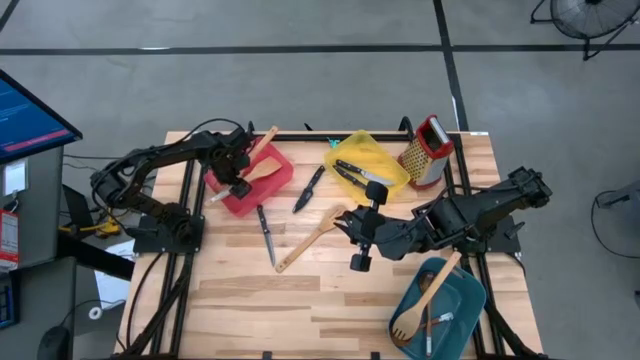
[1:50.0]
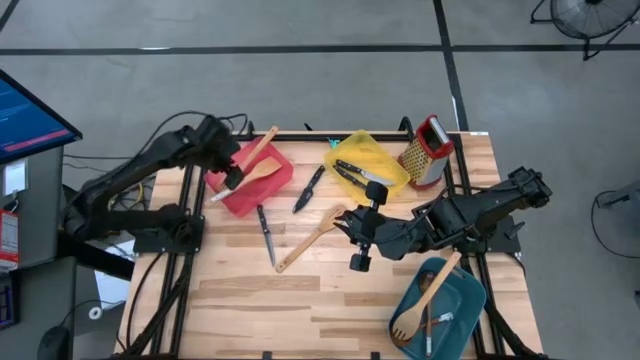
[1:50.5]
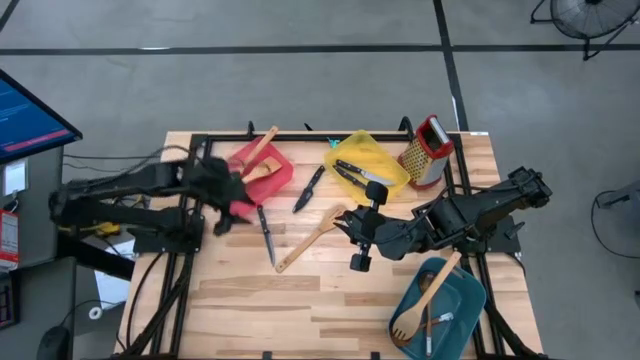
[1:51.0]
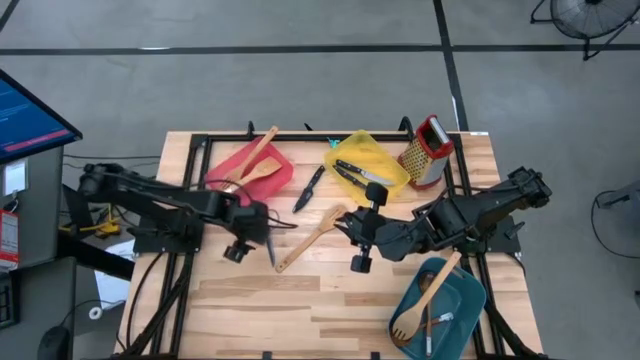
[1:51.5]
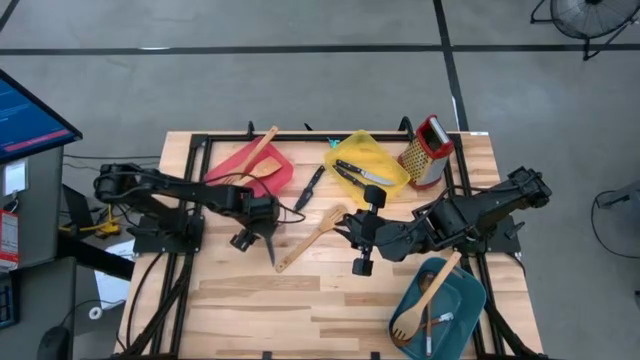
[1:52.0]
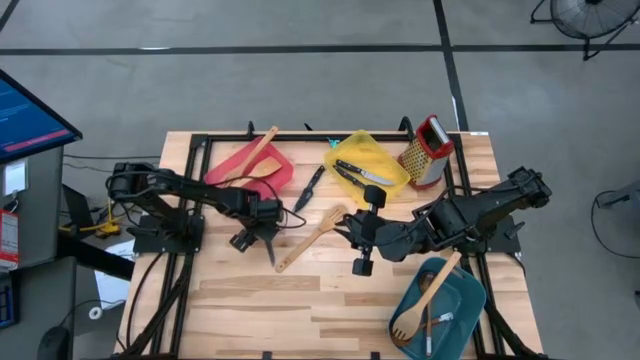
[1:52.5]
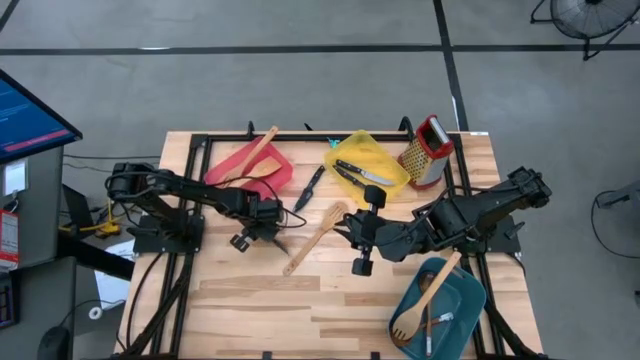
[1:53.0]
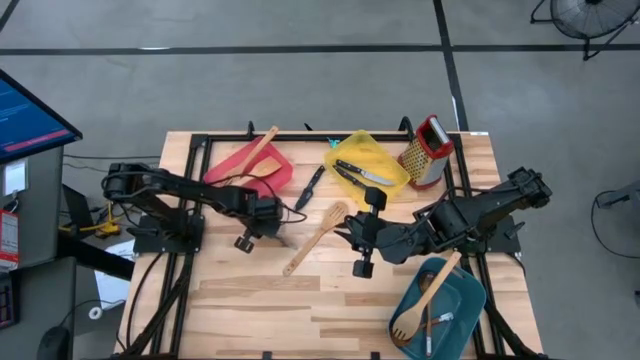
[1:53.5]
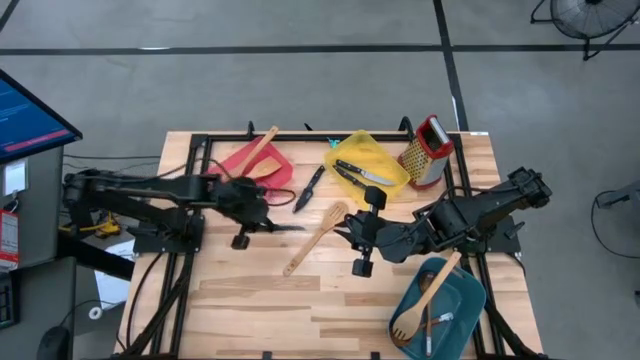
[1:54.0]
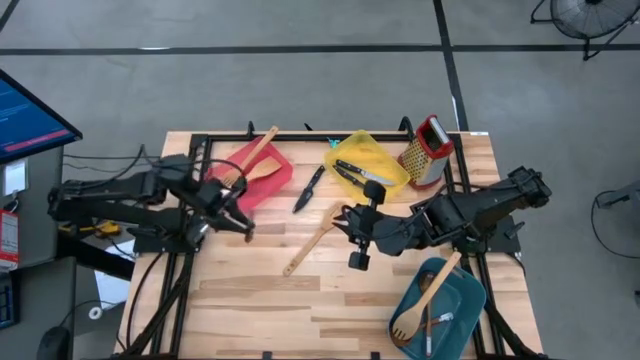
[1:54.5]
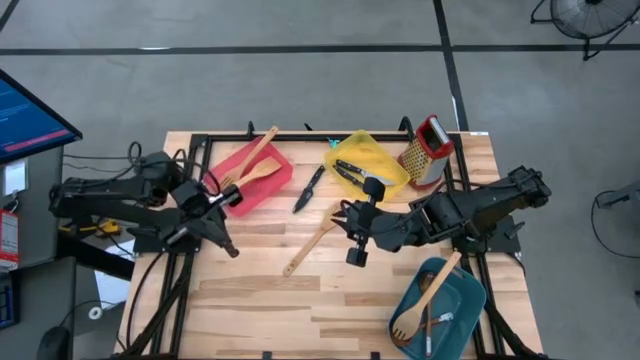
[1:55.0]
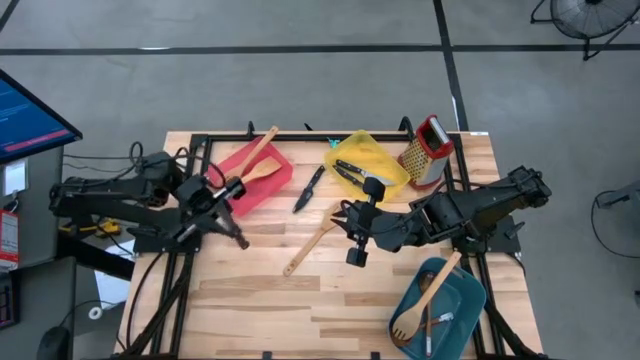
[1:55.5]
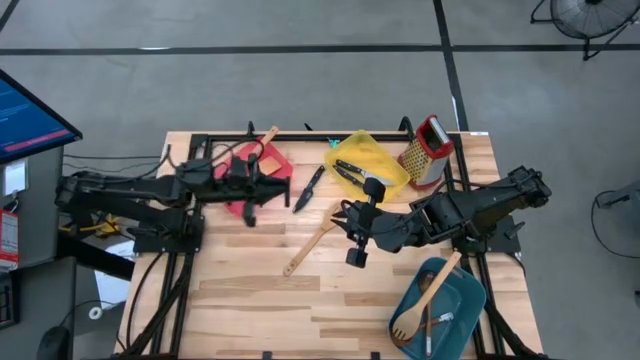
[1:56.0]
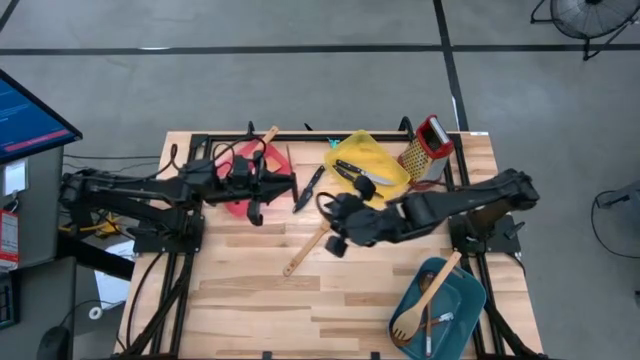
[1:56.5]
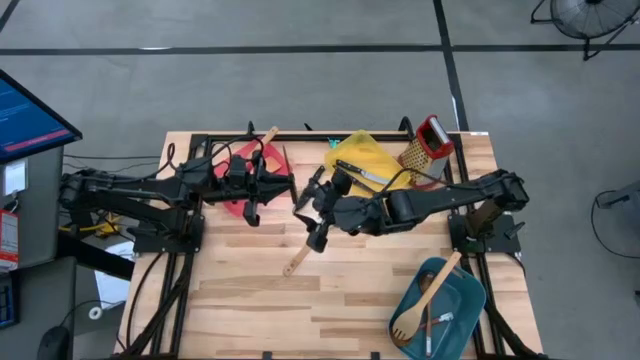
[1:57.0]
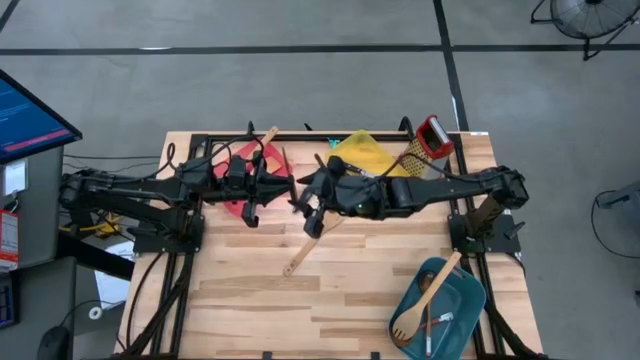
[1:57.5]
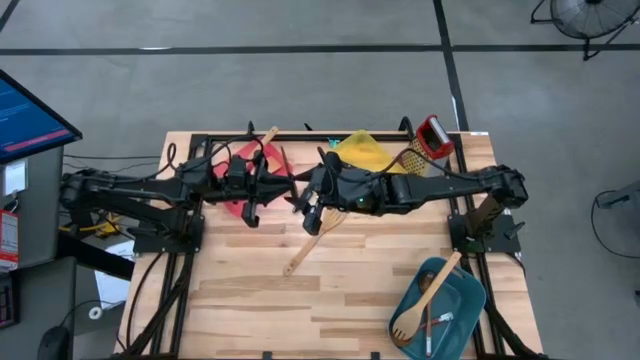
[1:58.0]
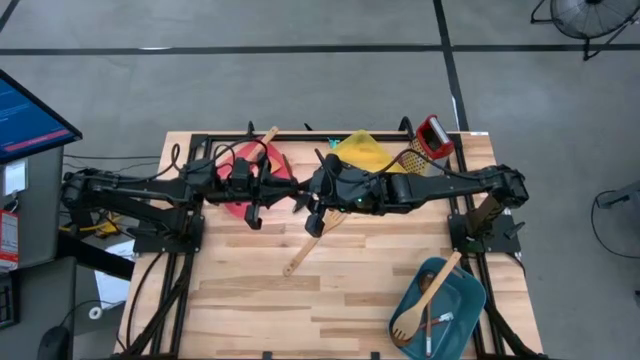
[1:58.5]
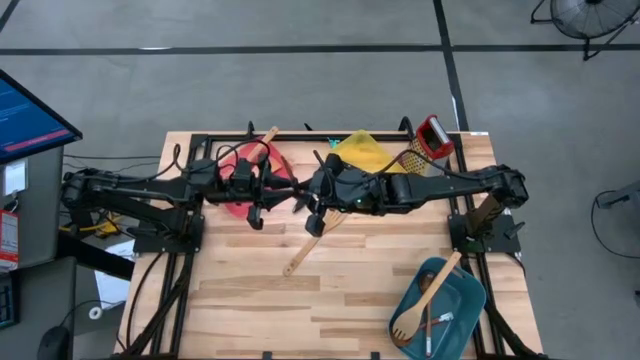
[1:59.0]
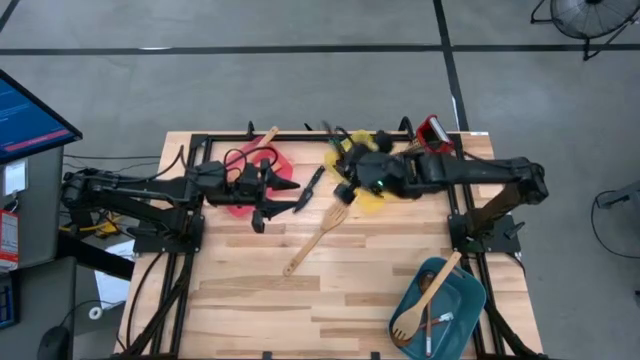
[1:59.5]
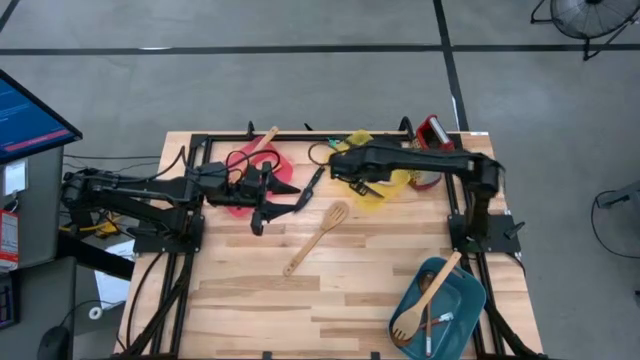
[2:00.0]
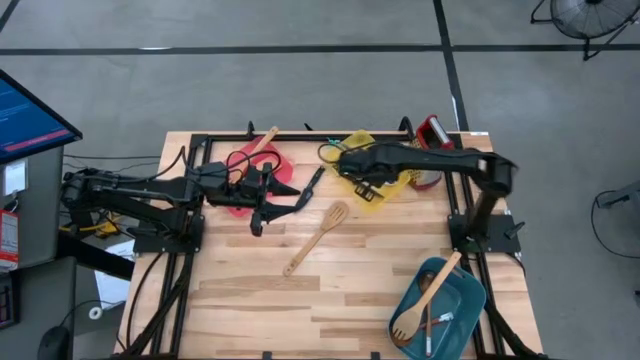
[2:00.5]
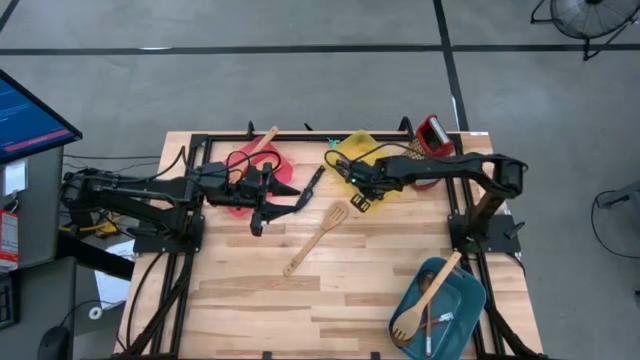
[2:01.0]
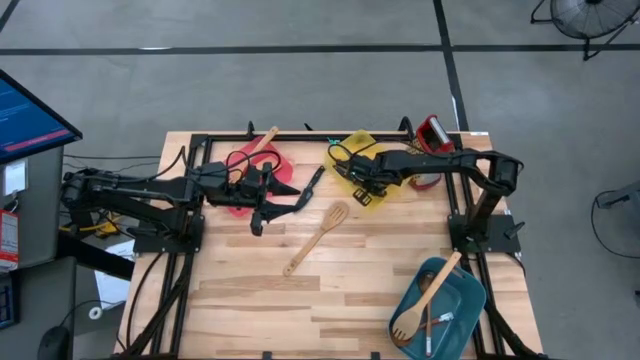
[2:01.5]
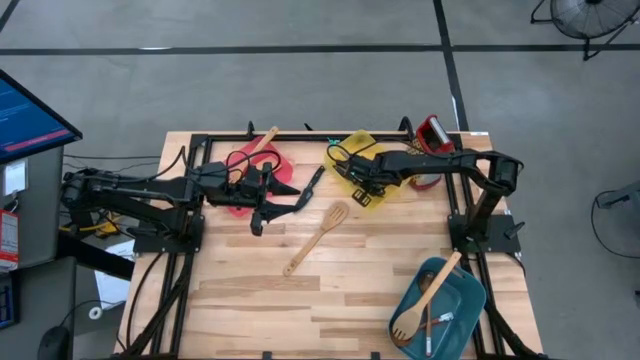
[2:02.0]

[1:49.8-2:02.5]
Task: Pick & Place Kitchen Items
Put the bottom black knife into the yellow bin

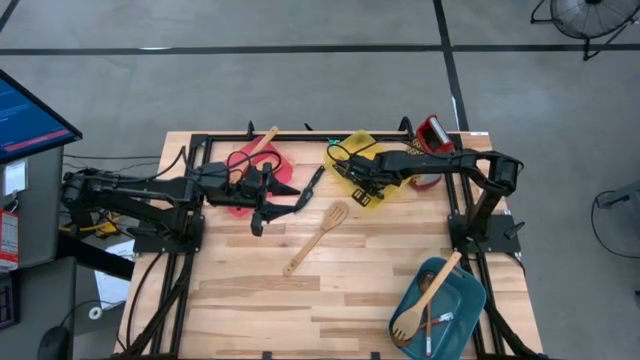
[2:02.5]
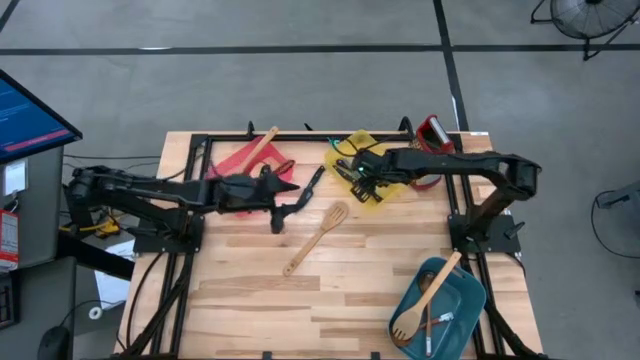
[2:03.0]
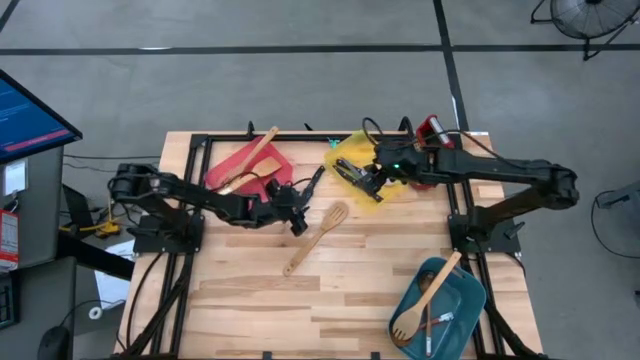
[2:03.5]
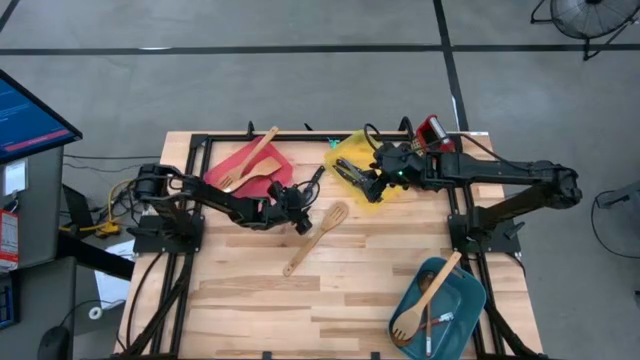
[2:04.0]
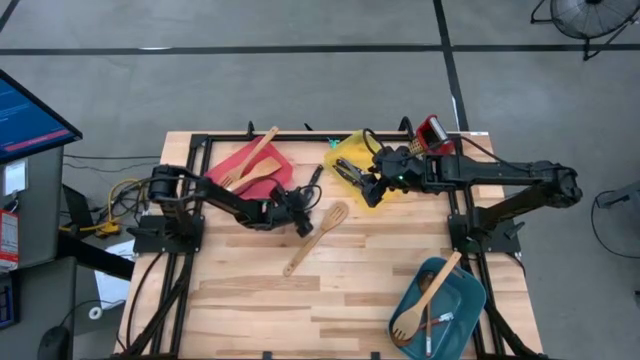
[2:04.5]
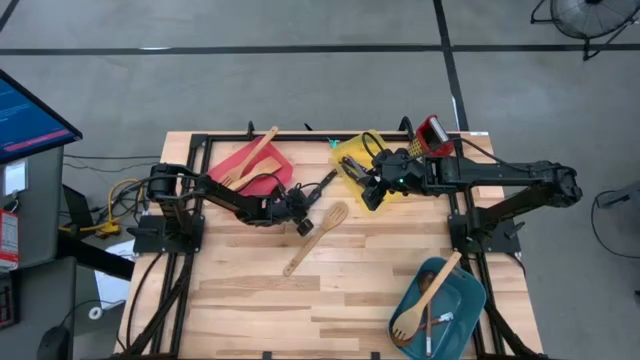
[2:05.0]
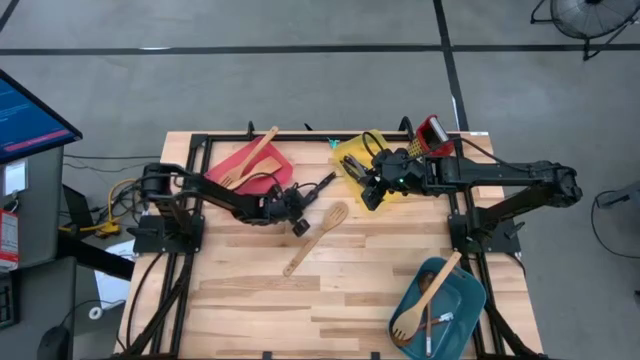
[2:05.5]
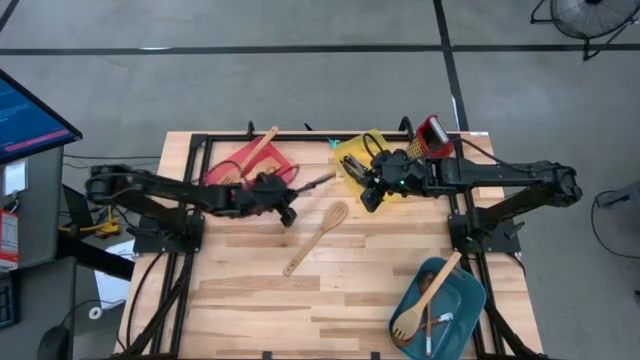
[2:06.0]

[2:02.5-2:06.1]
Put the black knife into the yellow bin

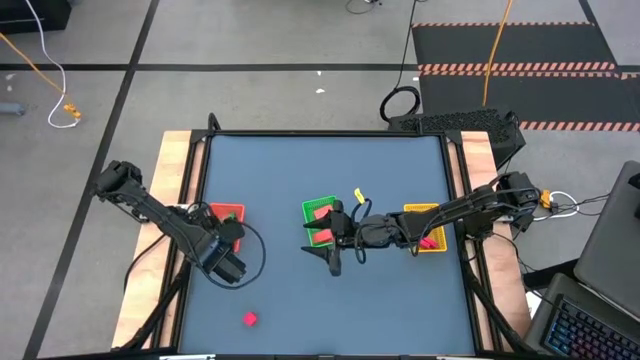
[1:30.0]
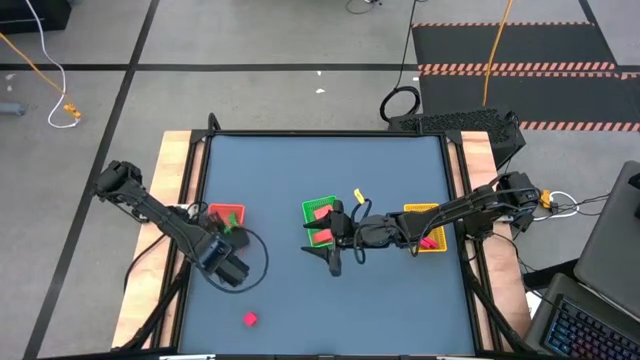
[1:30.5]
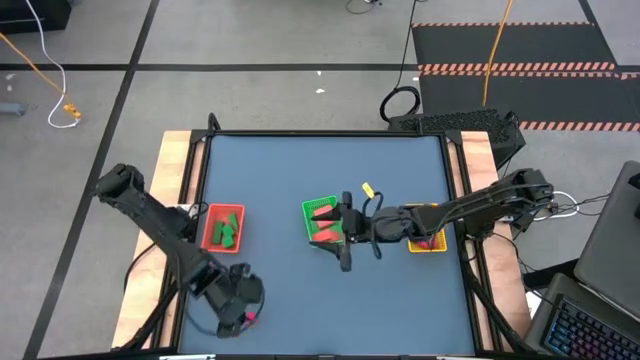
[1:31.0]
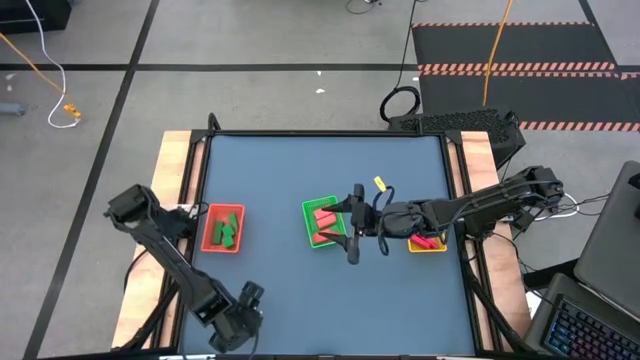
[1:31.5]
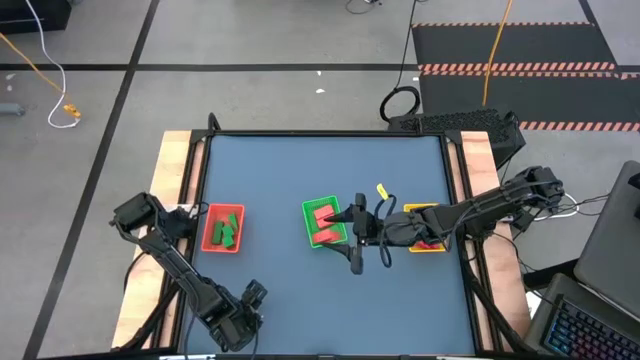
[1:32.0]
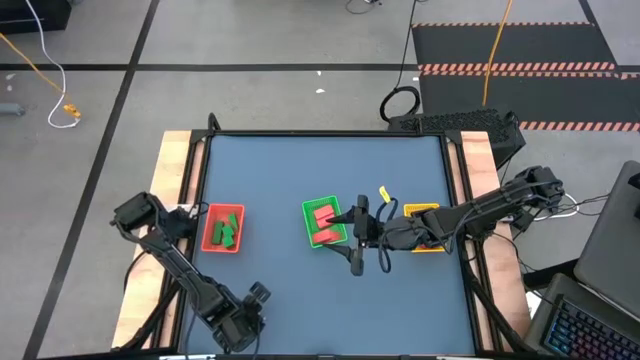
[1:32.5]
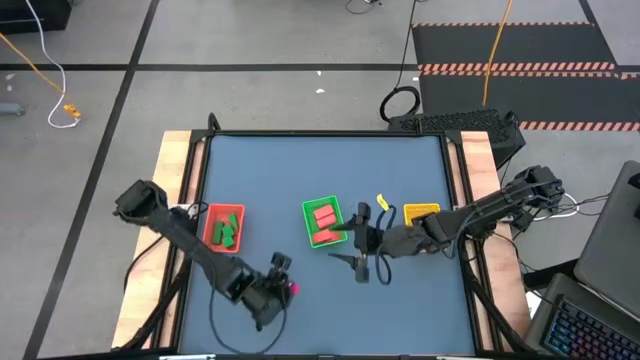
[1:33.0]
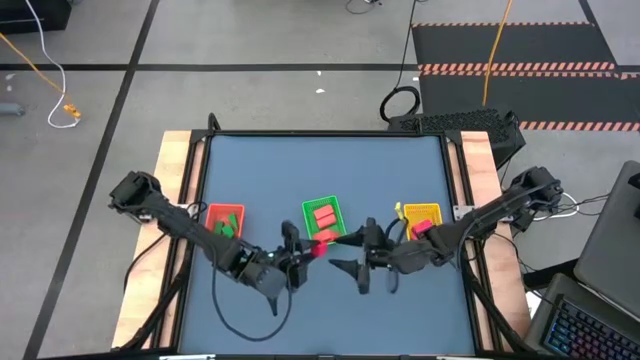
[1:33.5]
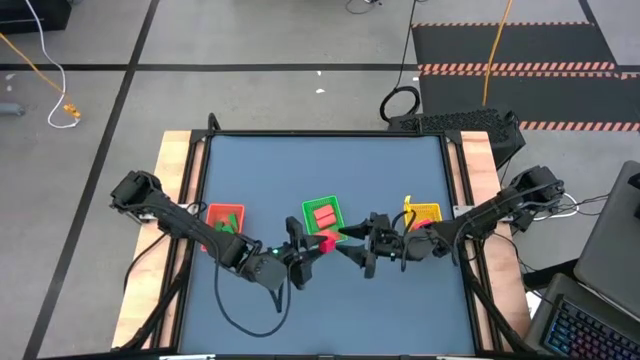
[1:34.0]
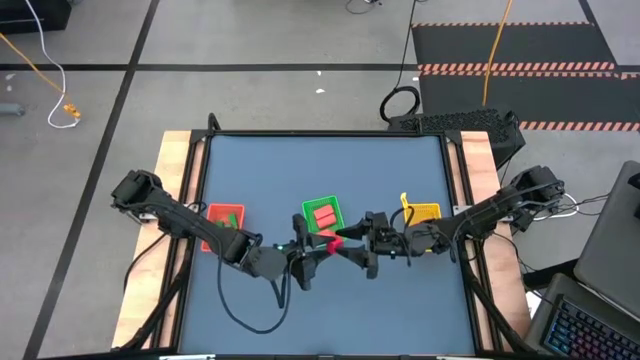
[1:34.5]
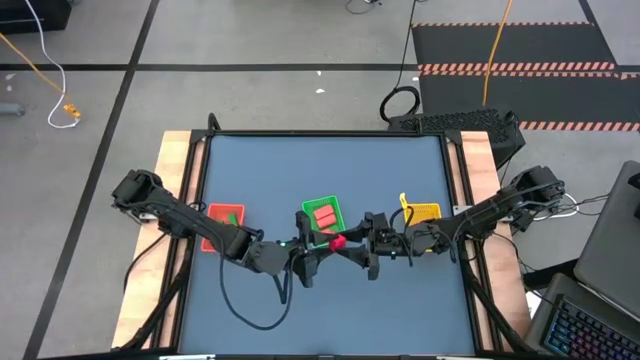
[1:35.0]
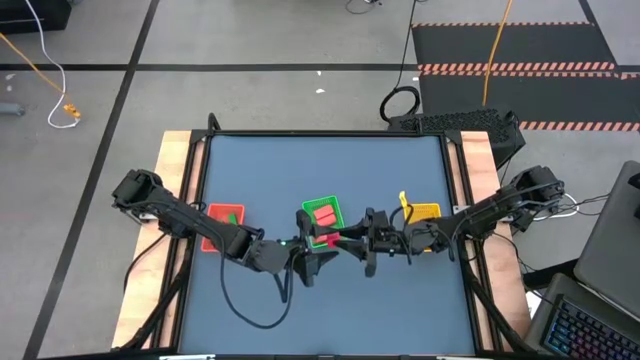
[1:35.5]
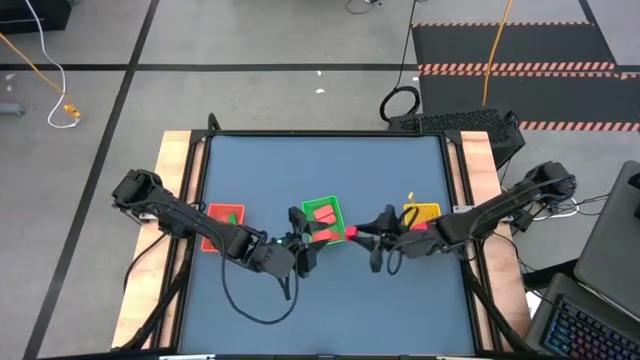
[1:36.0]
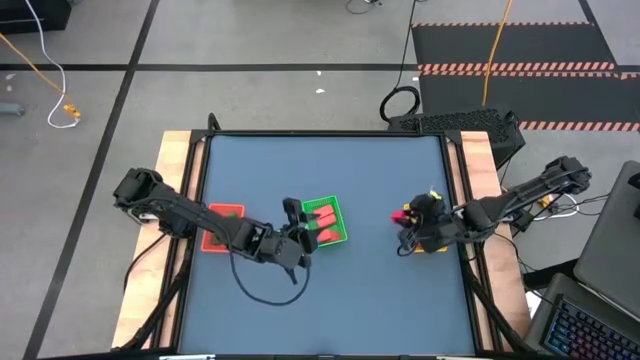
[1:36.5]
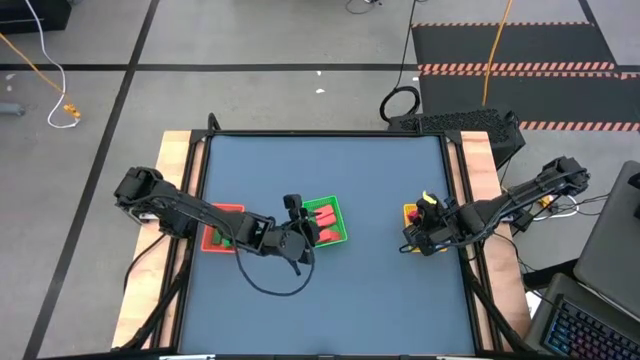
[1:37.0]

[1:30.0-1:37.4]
Task: Sort & place blocks by color
Put the red block into the yellow bin
